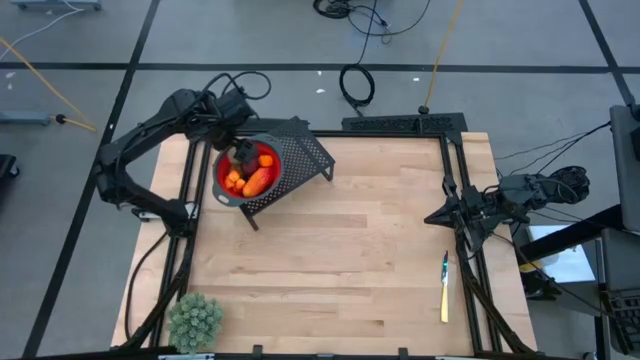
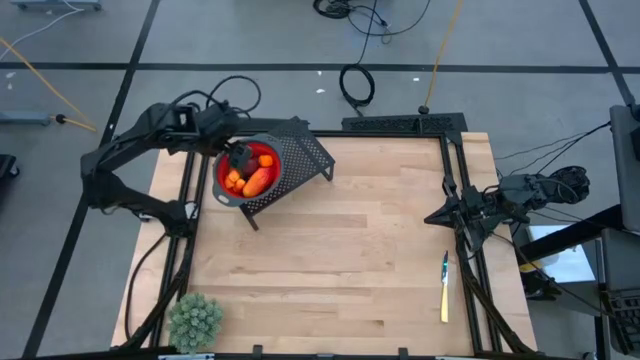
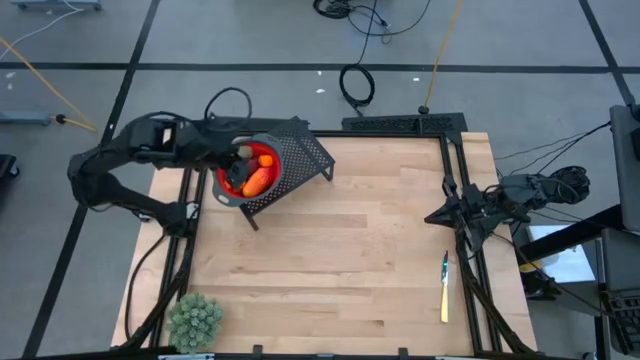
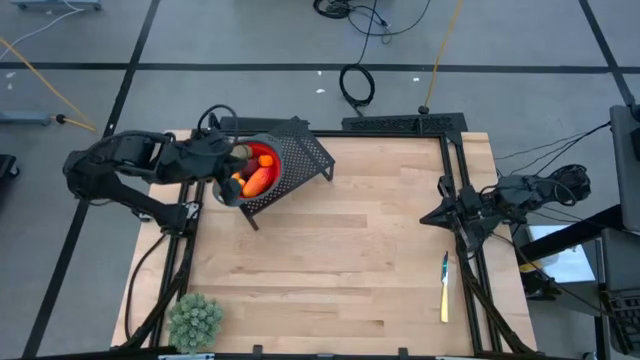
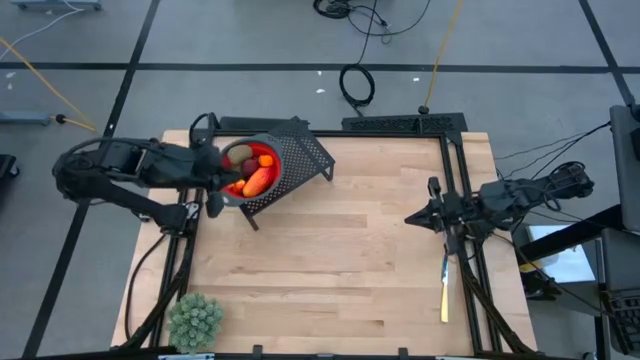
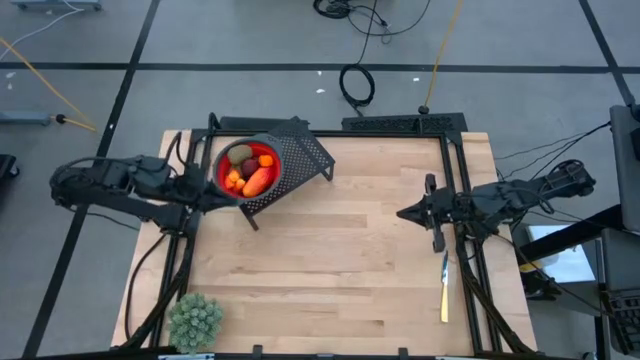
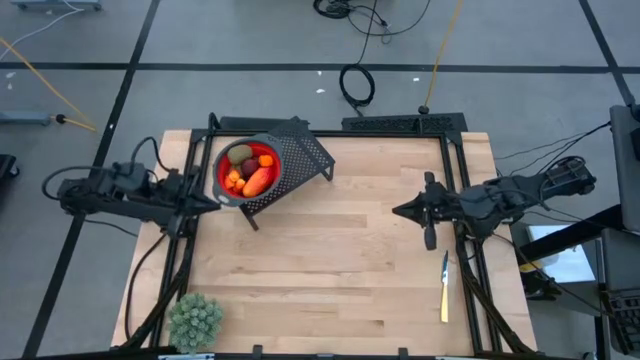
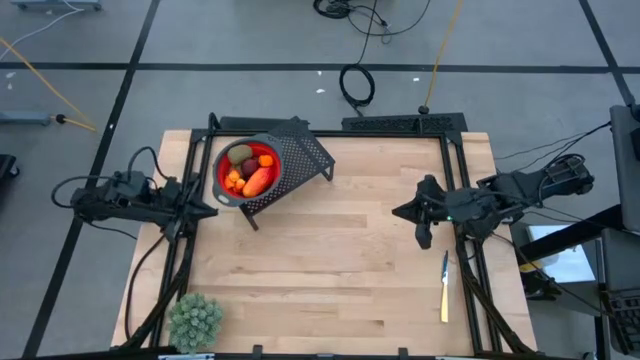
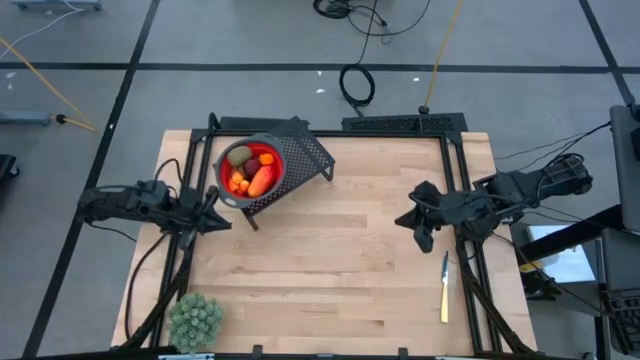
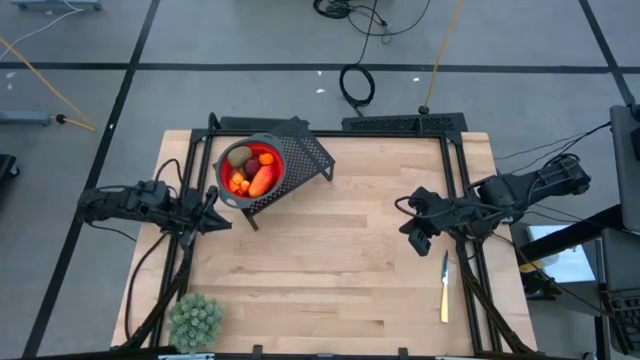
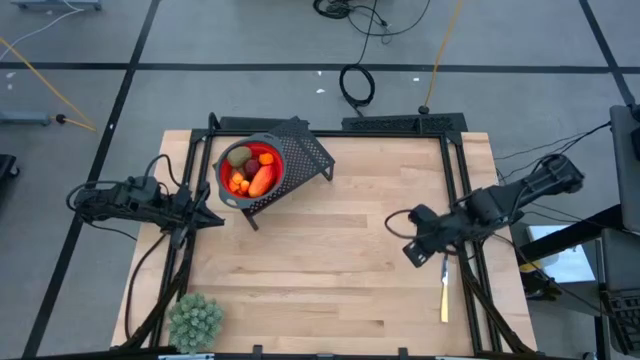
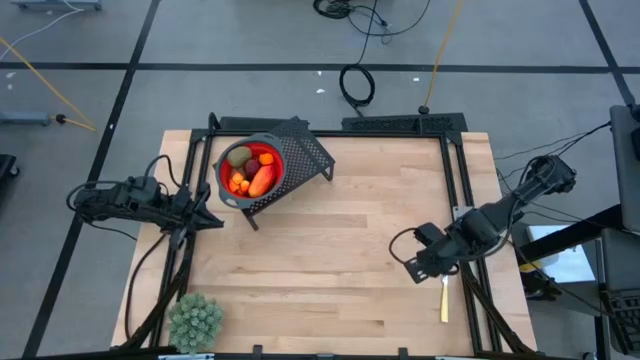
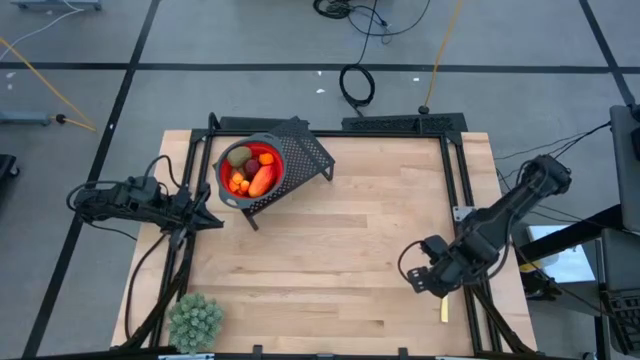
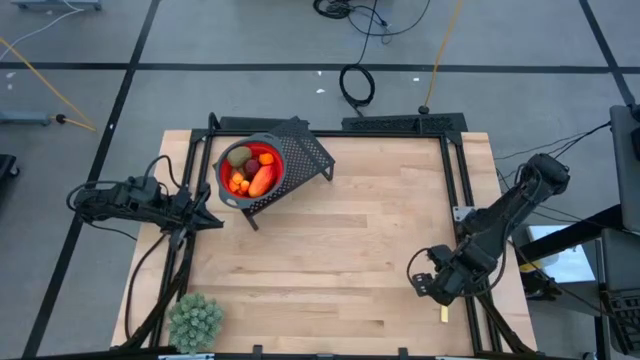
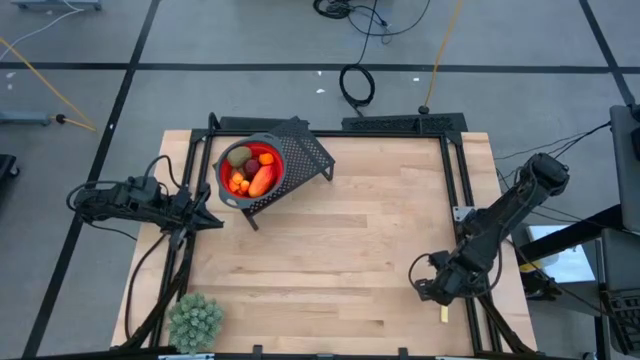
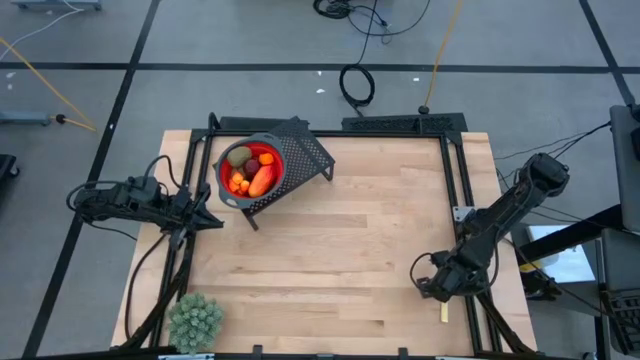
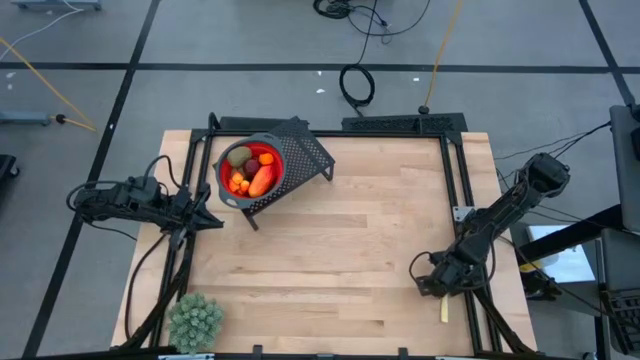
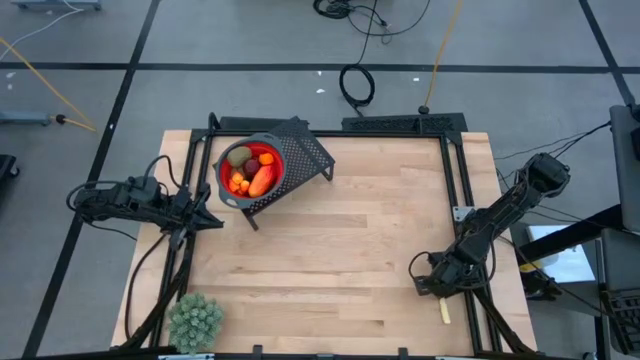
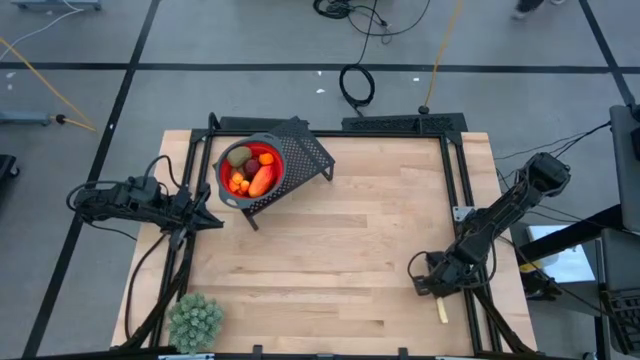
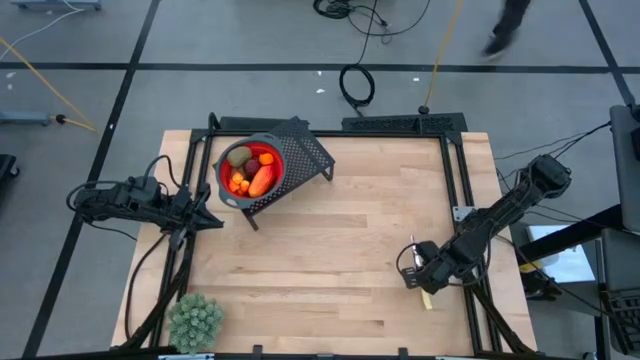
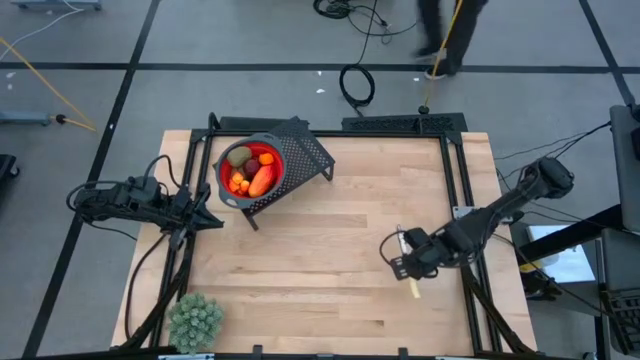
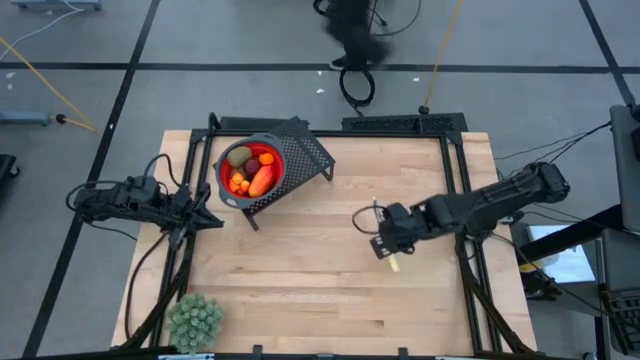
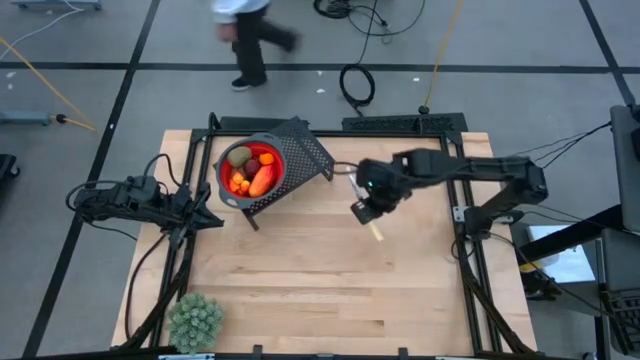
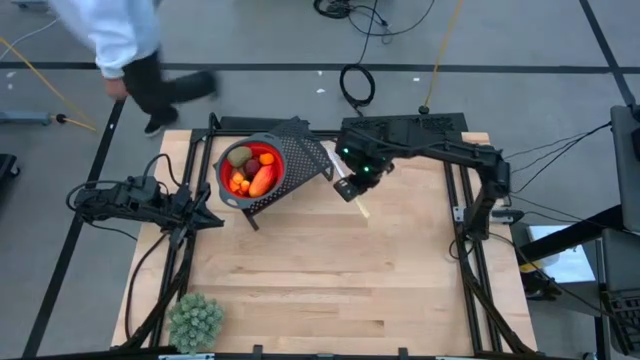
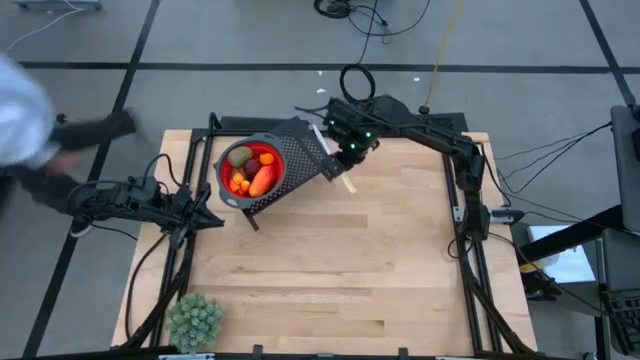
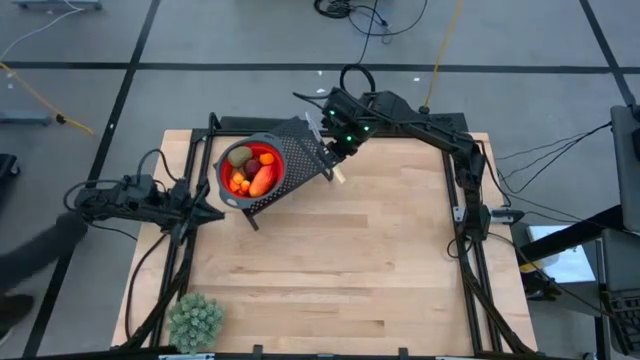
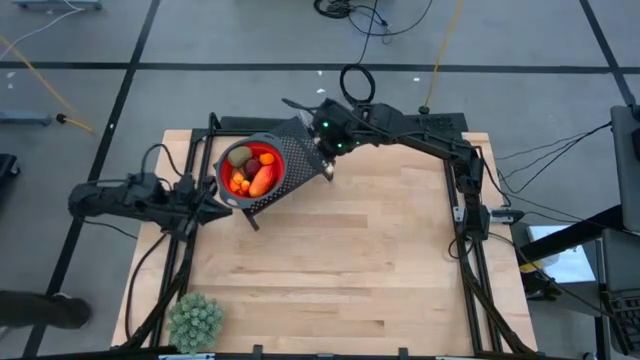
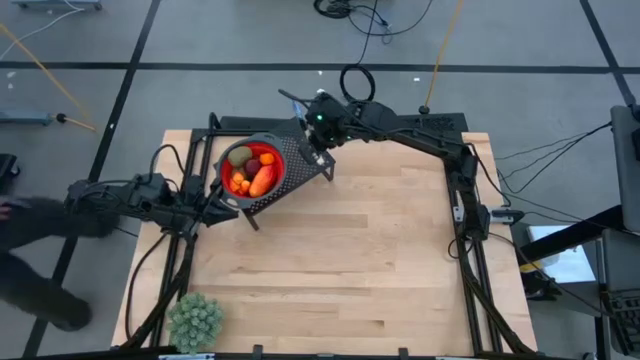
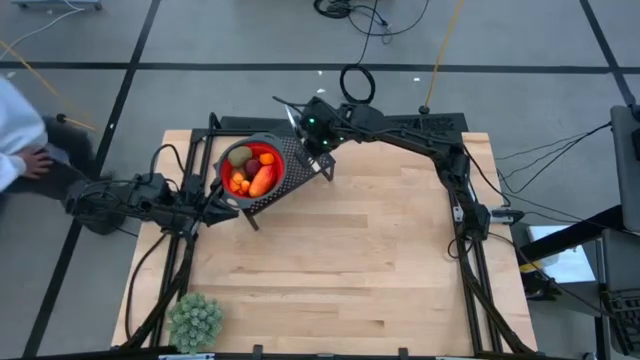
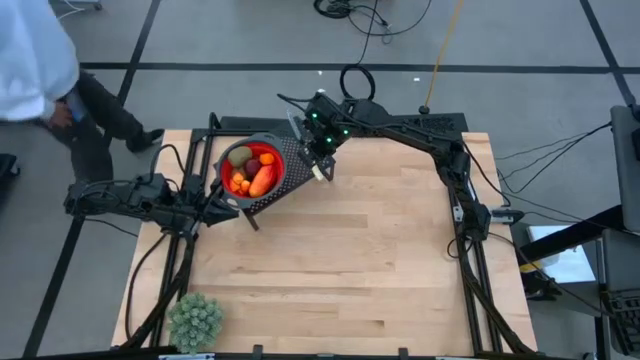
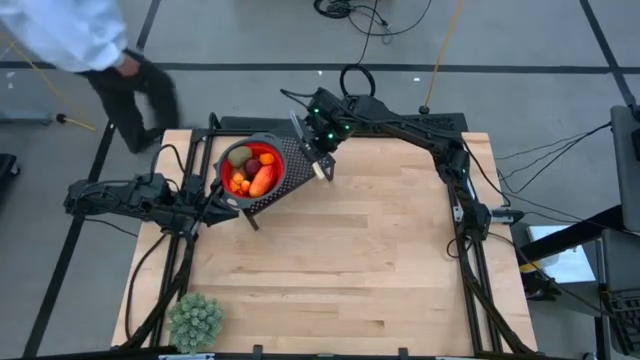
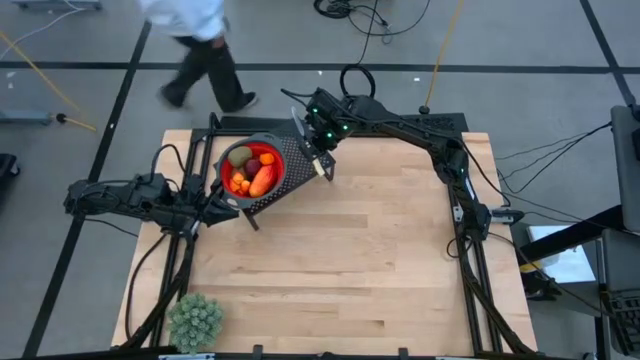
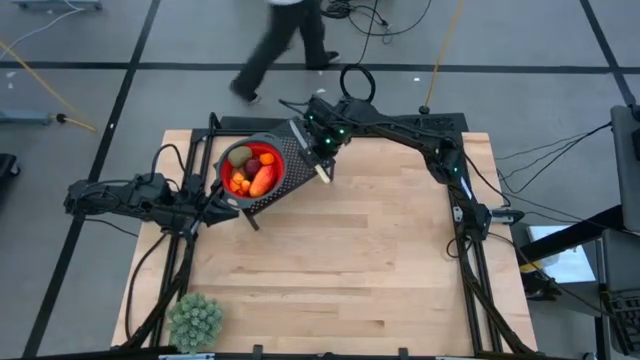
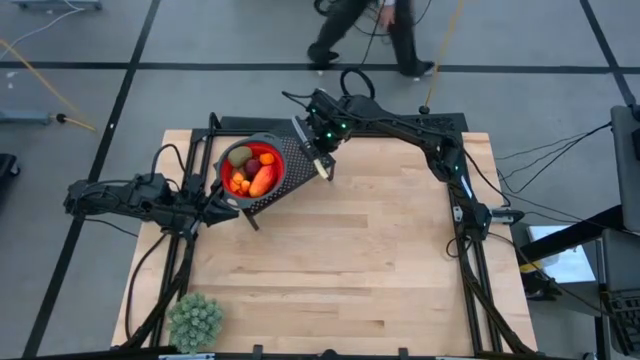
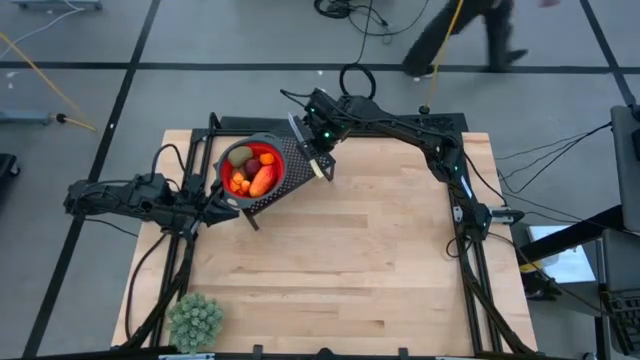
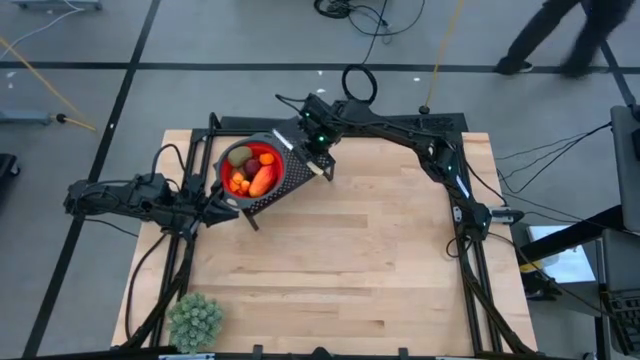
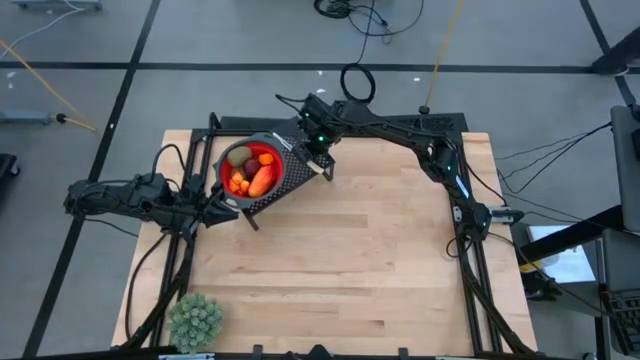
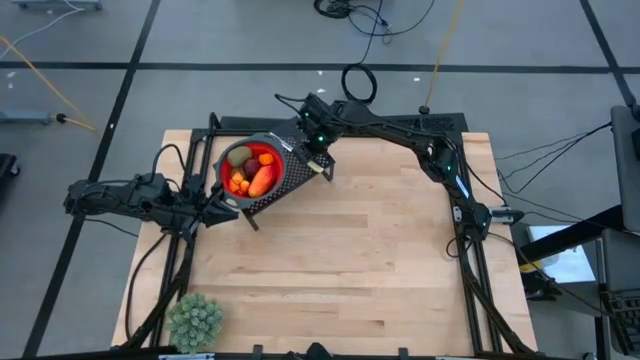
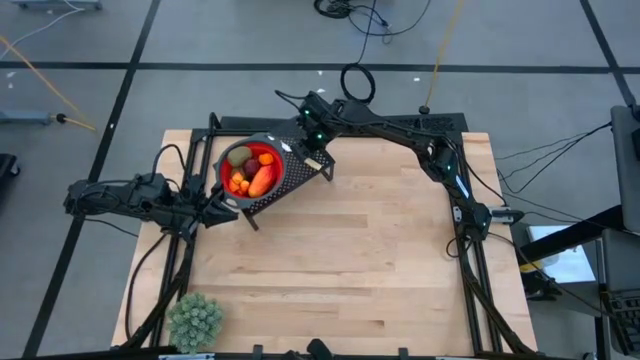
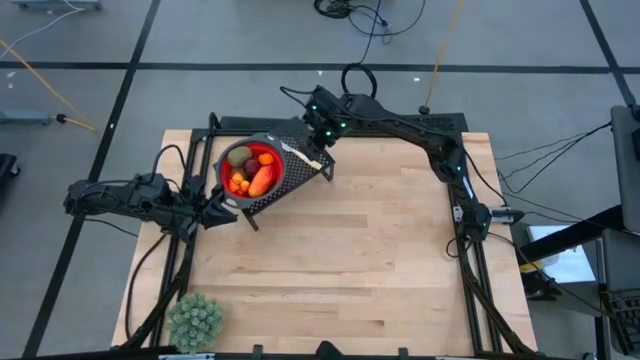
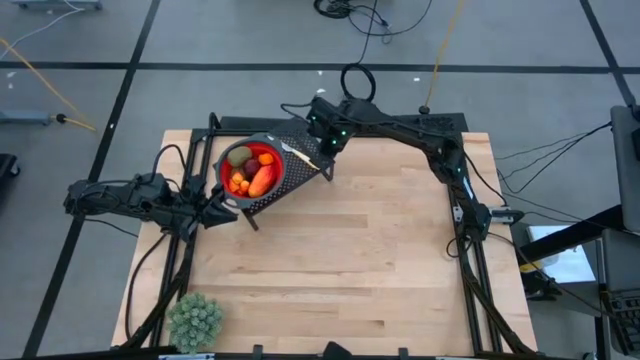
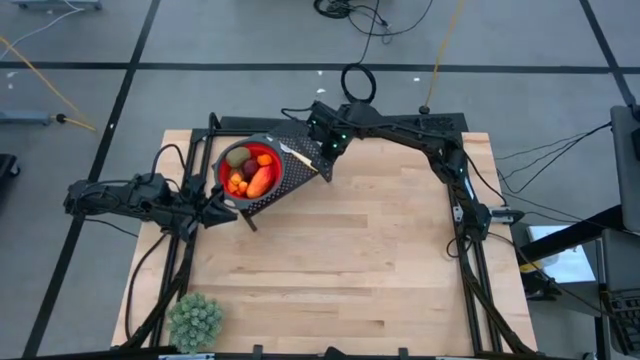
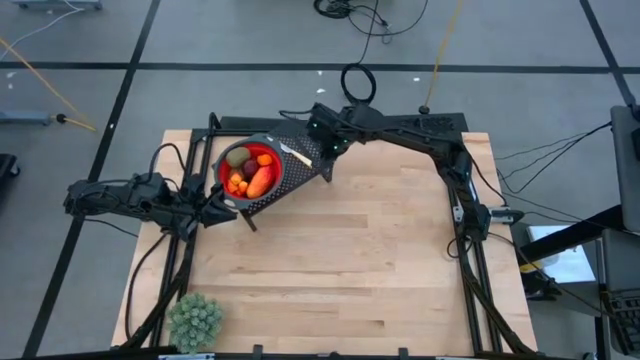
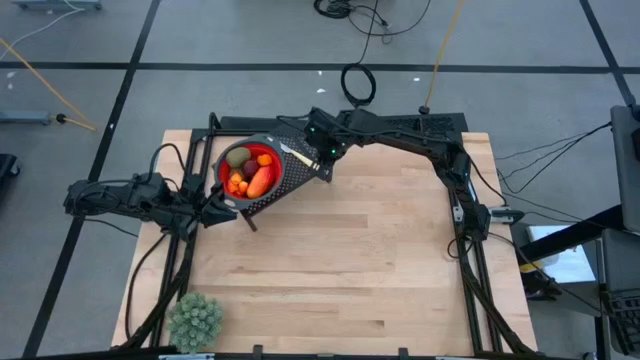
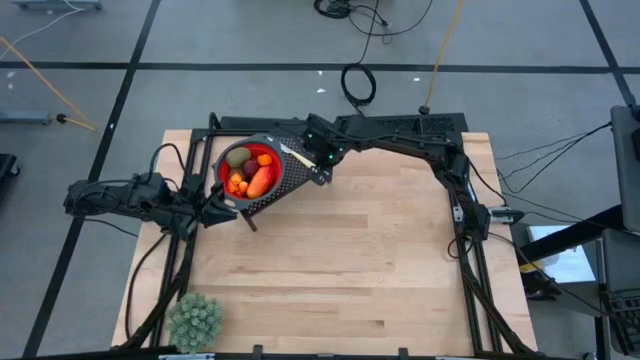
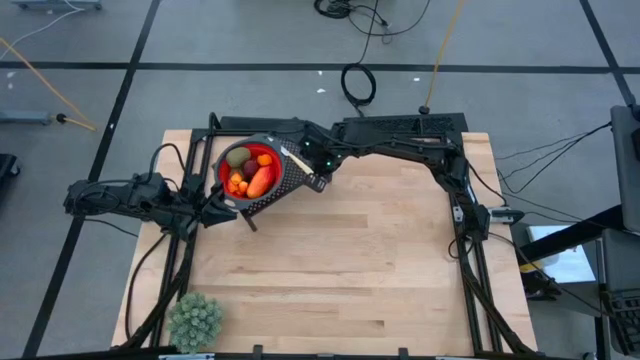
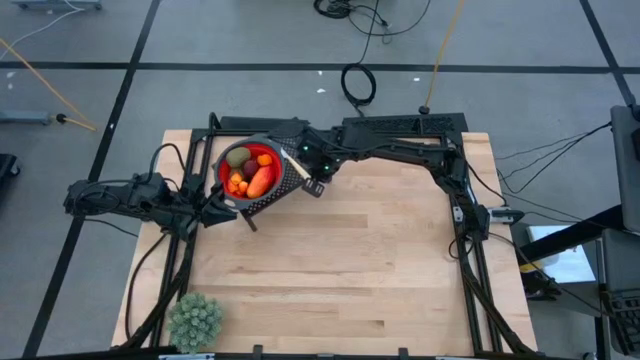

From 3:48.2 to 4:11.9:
Task: Pick & Place Fruit
Put the knife on the shelf
